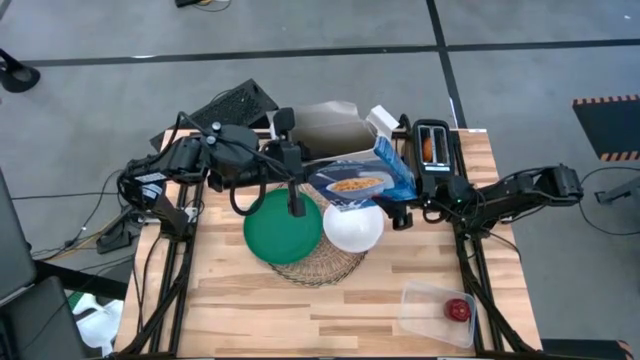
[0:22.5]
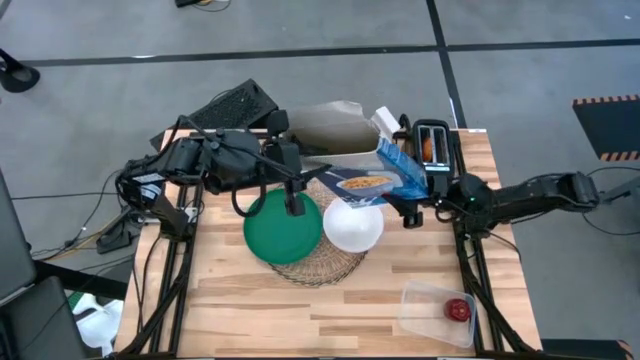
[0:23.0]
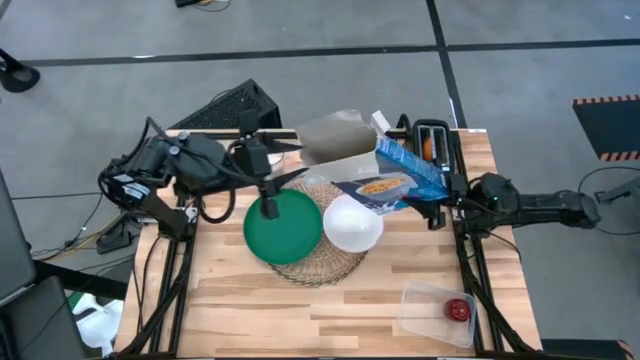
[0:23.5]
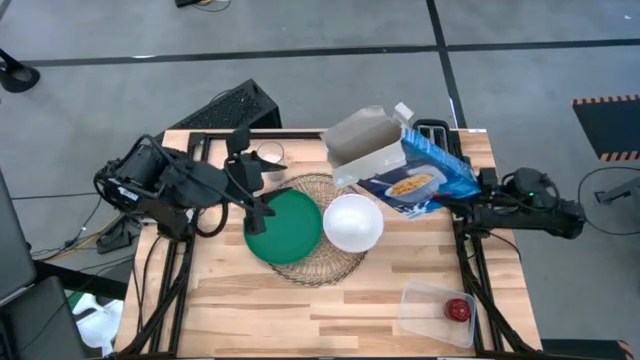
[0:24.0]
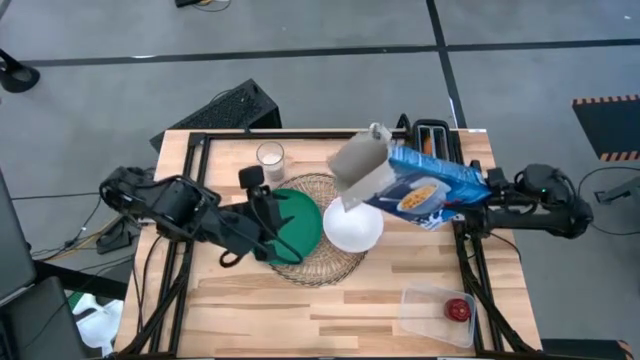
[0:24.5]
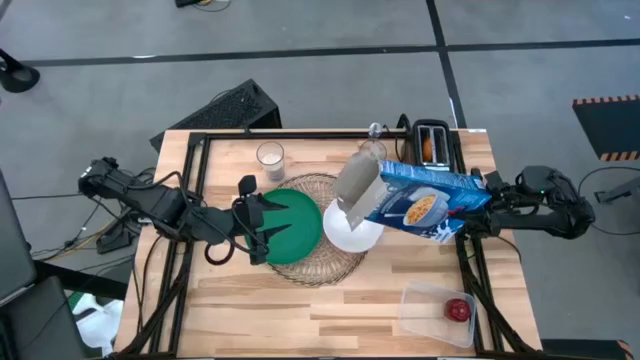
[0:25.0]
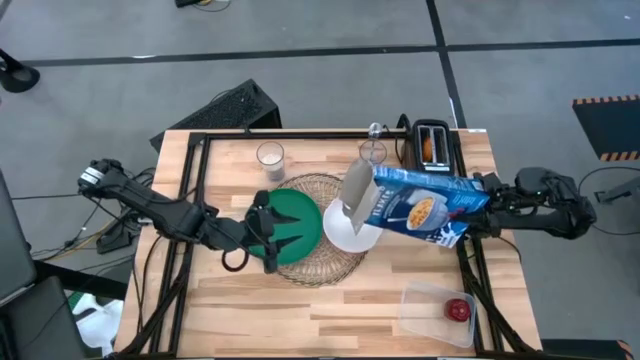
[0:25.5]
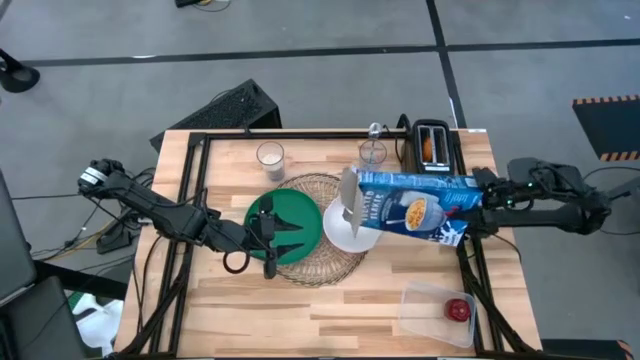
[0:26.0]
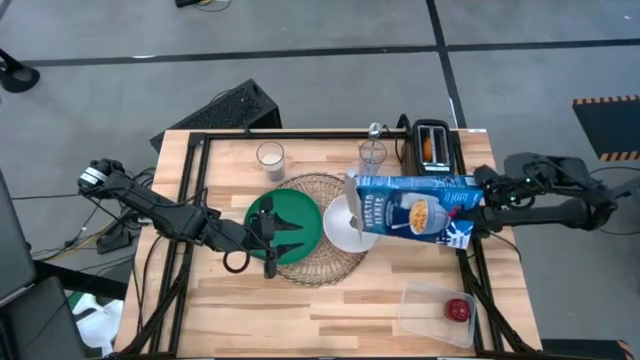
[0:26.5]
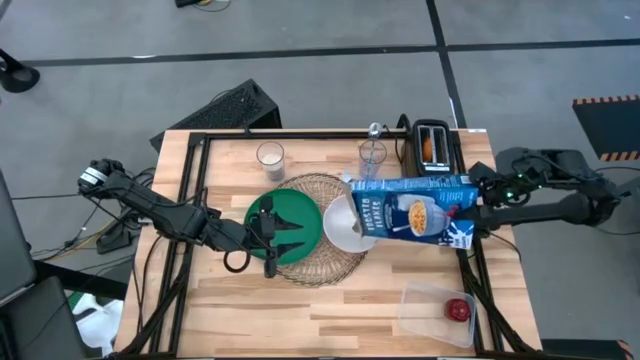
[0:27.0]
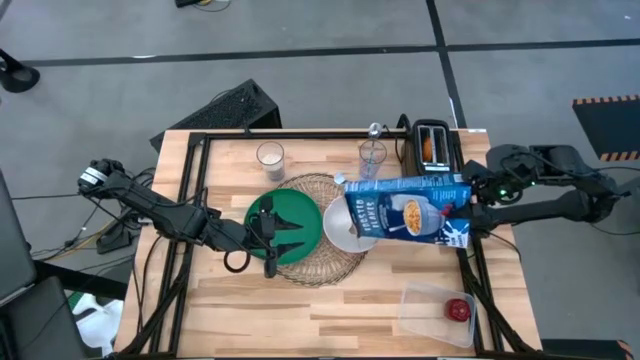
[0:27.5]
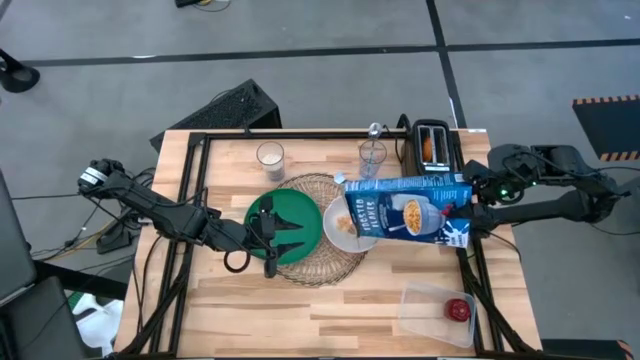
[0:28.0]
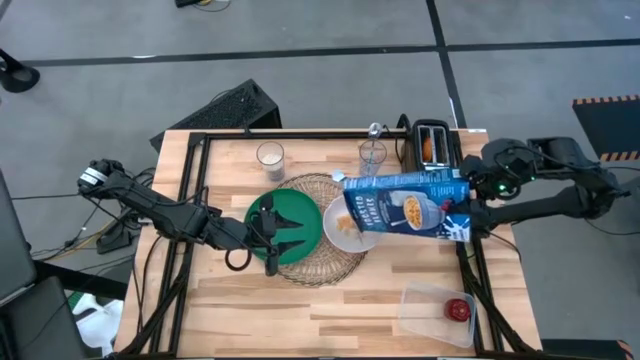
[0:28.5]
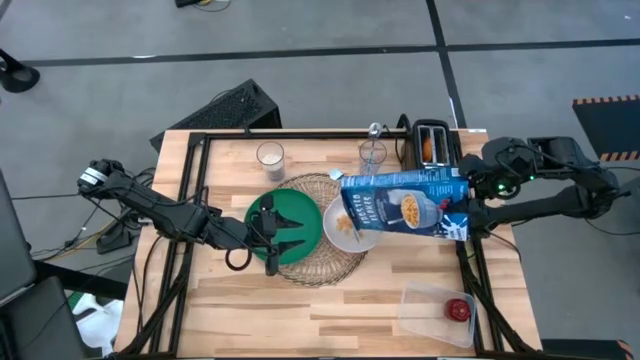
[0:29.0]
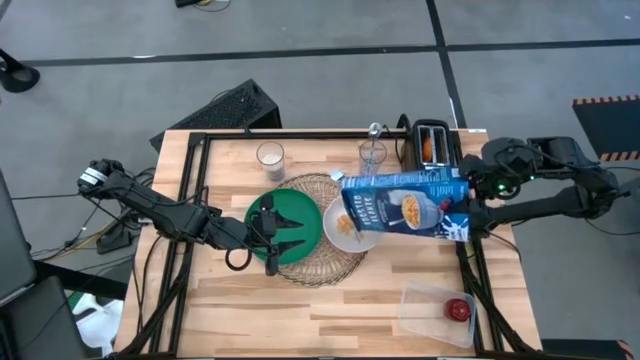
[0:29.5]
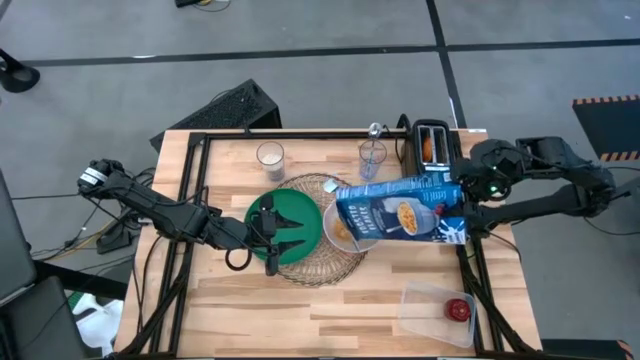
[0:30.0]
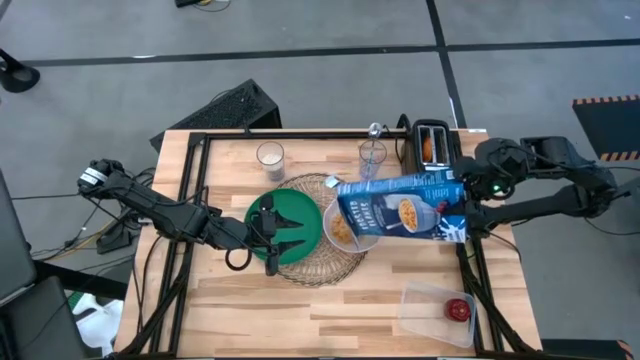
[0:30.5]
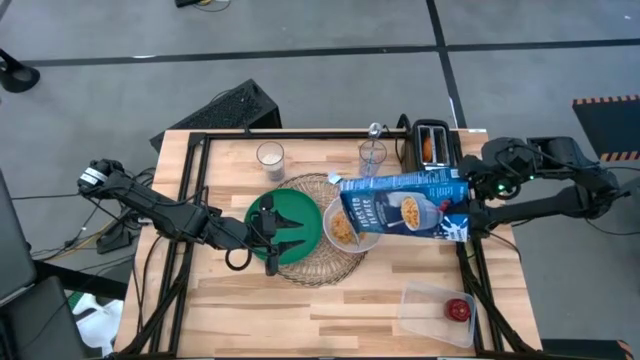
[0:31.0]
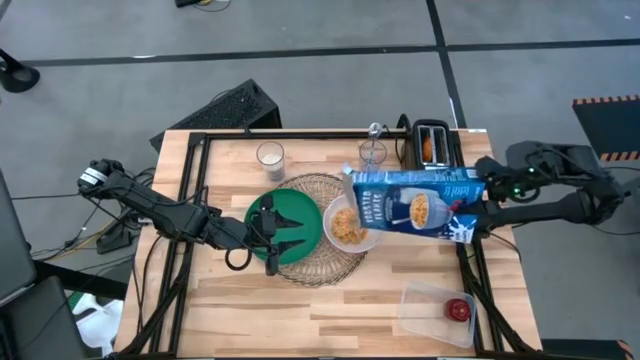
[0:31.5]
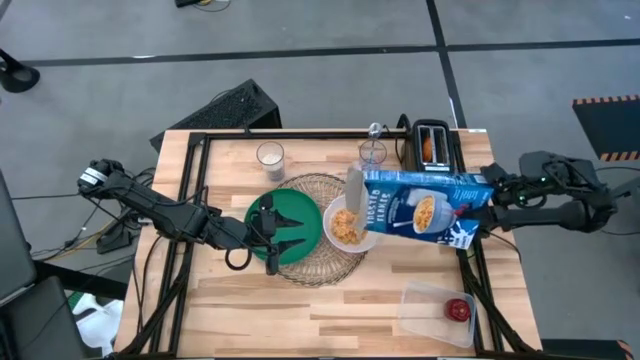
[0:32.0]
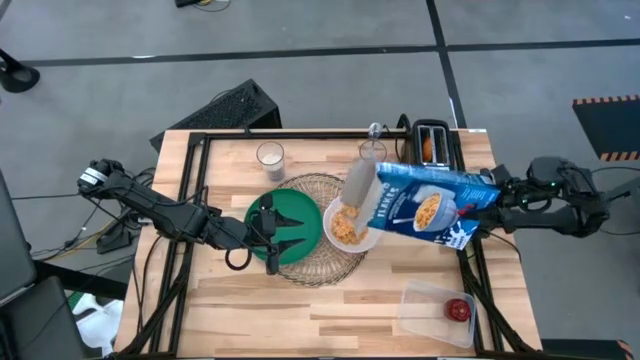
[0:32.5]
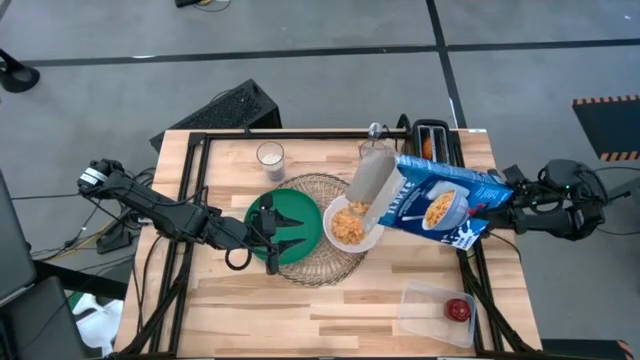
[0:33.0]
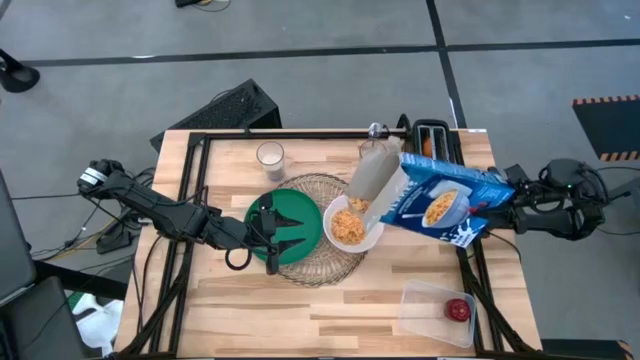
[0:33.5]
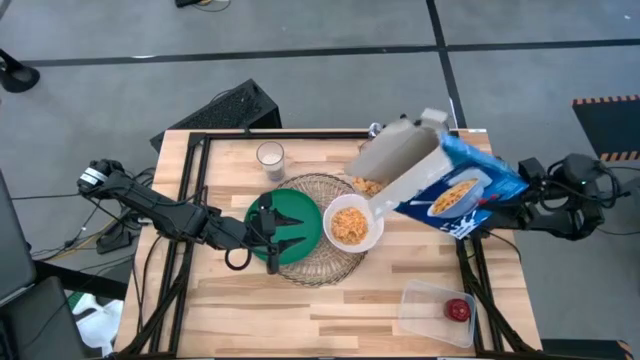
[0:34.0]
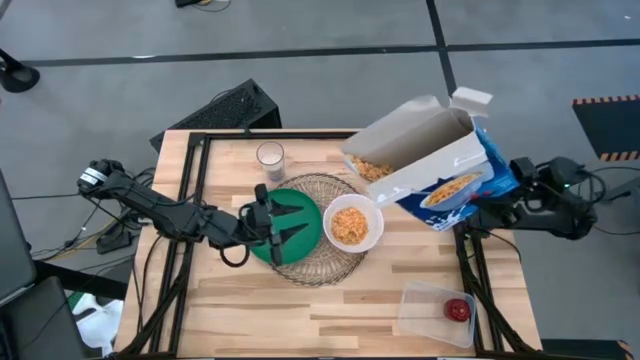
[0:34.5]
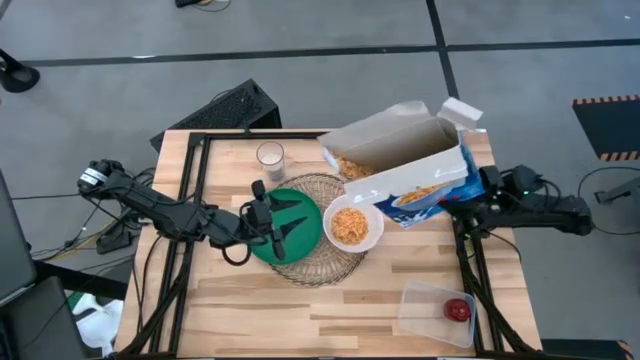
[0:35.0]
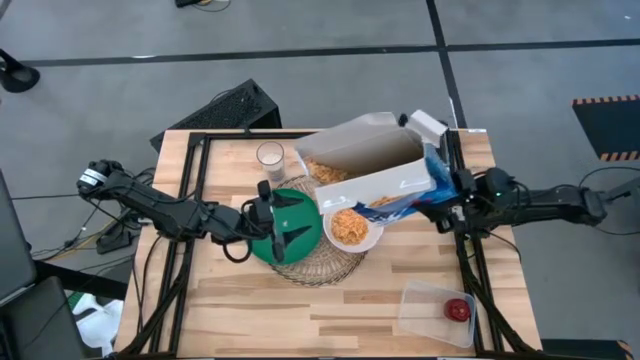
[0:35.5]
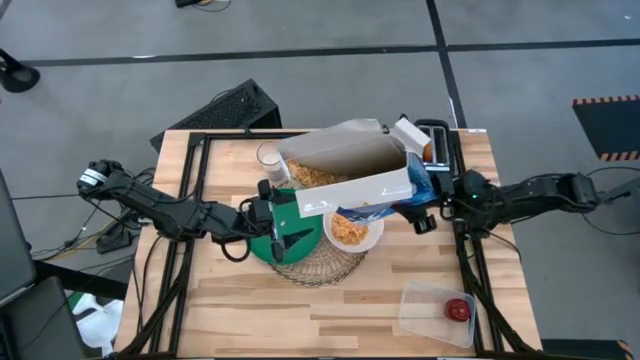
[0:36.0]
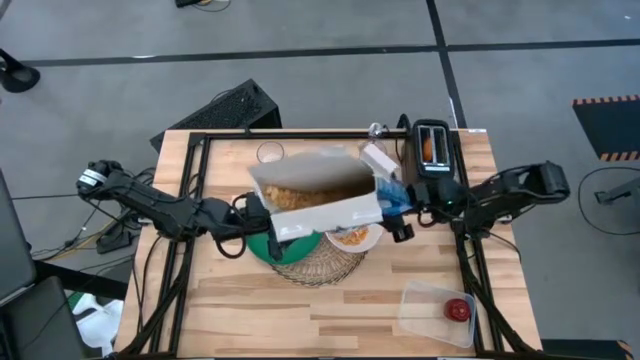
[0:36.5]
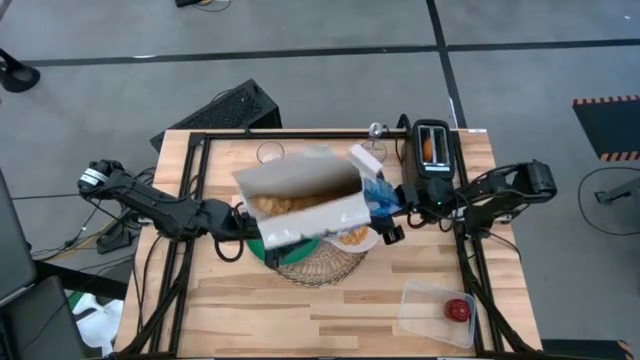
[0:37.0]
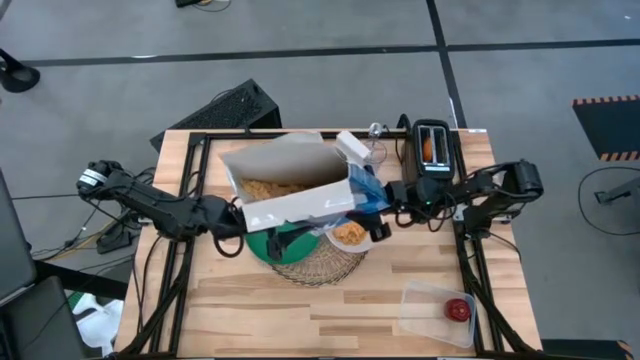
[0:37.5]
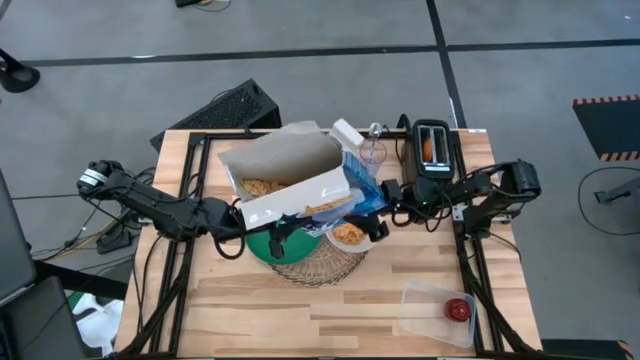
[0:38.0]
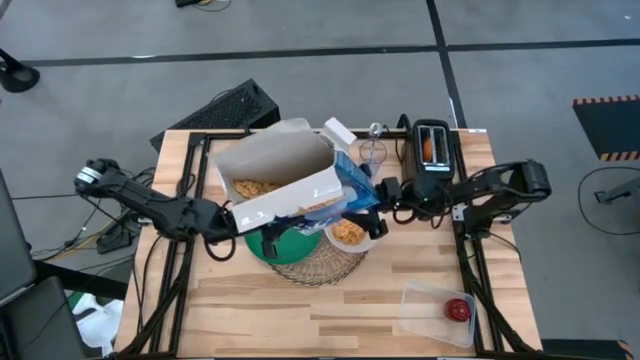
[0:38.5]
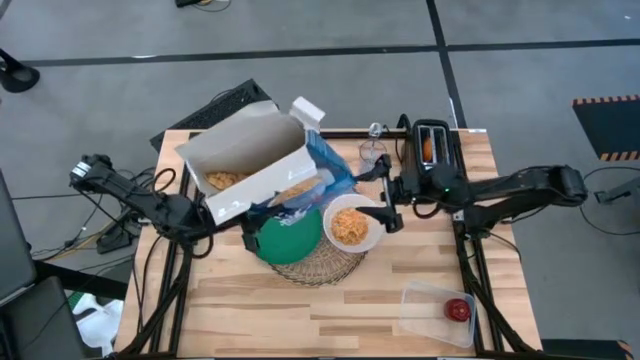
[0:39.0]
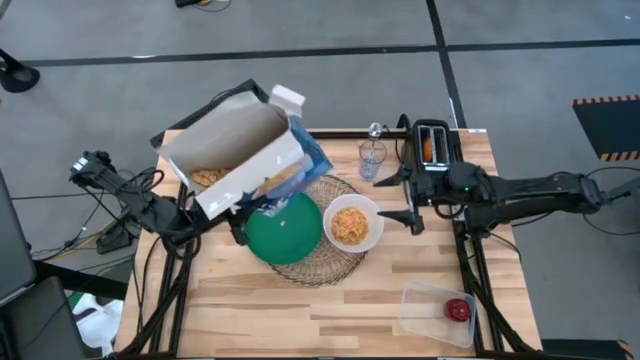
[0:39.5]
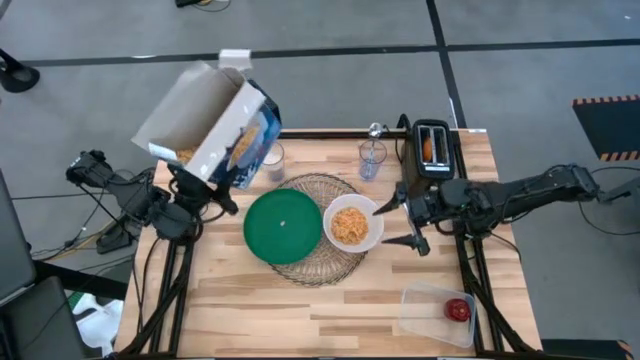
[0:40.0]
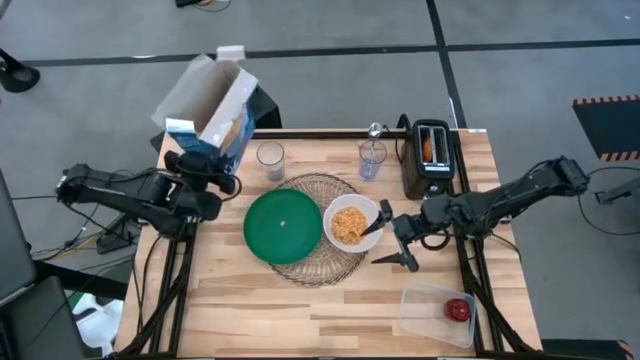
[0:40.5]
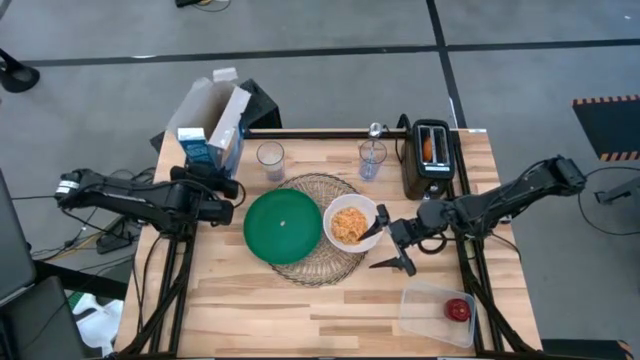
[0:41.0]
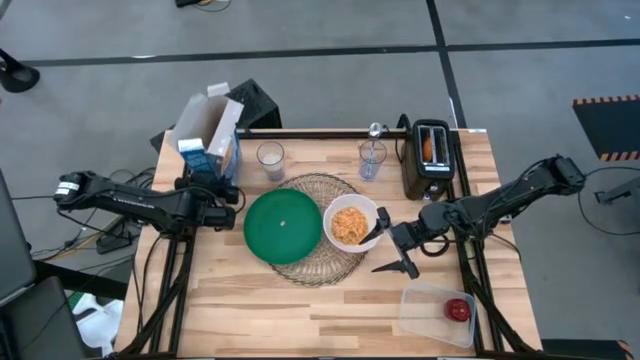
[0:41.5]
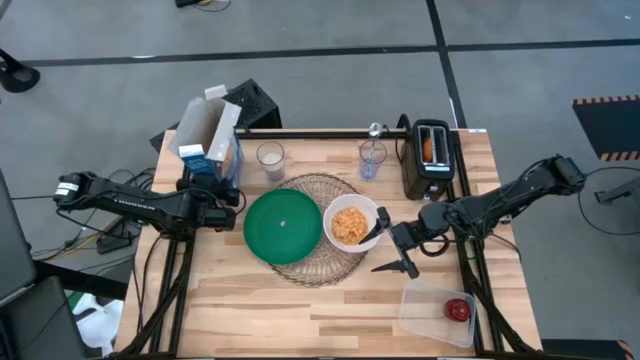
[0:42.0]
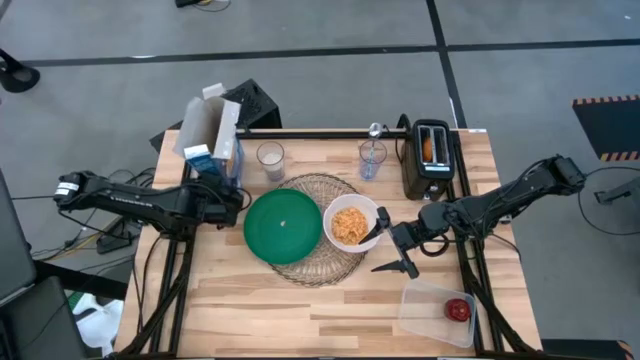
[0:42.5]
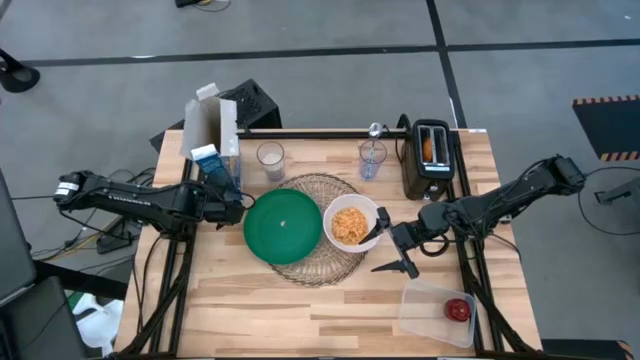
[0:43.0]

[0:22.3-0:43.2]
Task: Arrange a breakfast setting
Pour the cereal into the white bowl from the cereal box
